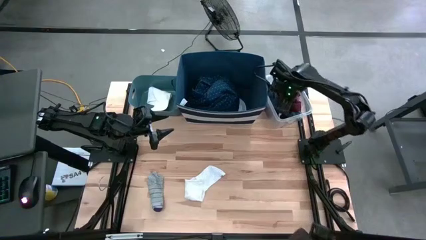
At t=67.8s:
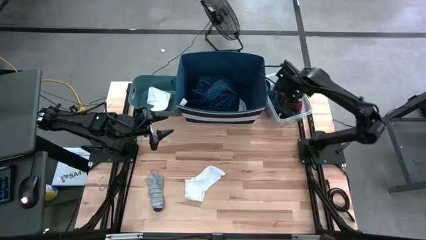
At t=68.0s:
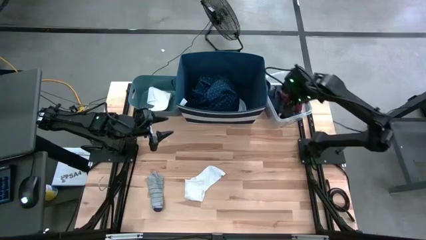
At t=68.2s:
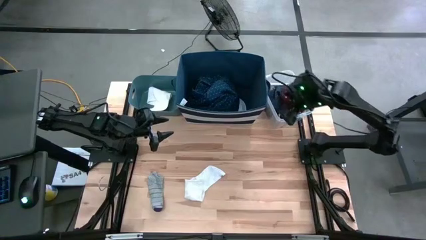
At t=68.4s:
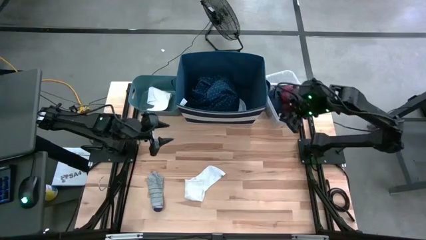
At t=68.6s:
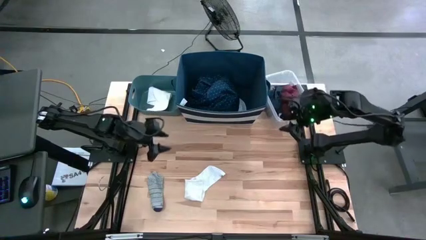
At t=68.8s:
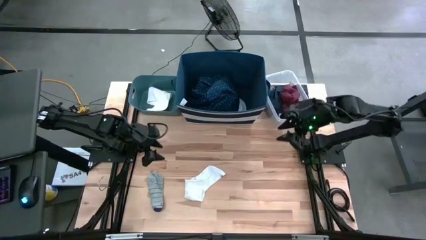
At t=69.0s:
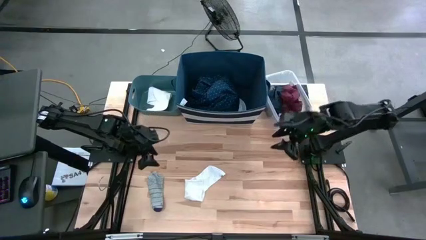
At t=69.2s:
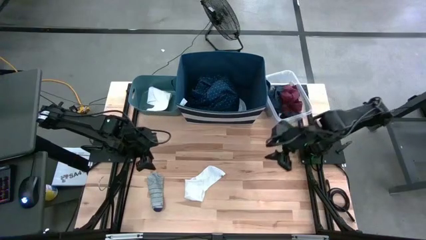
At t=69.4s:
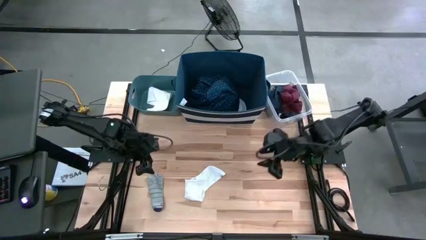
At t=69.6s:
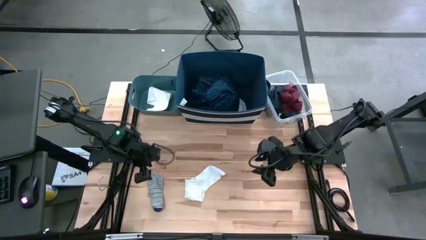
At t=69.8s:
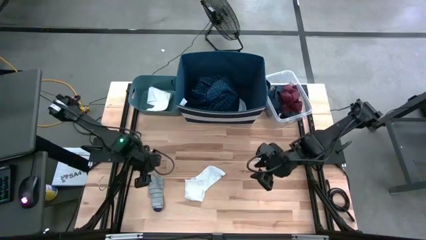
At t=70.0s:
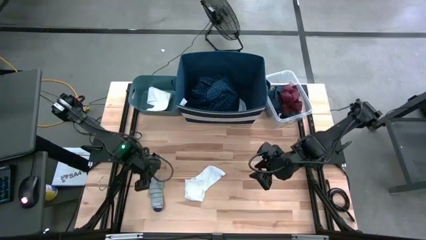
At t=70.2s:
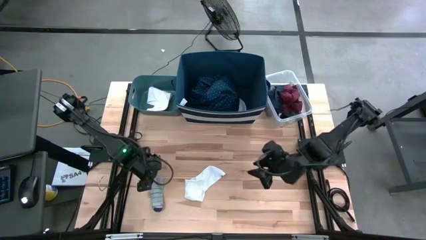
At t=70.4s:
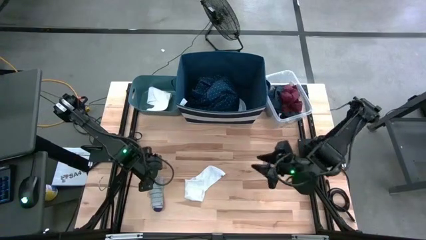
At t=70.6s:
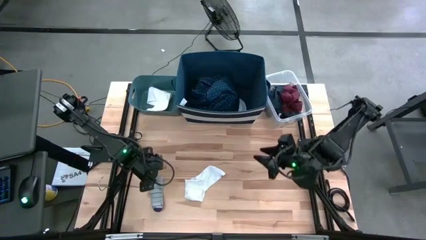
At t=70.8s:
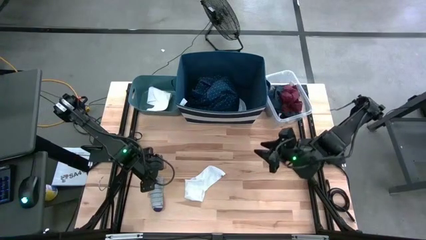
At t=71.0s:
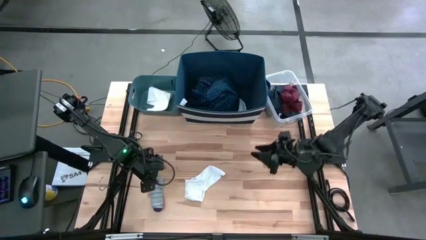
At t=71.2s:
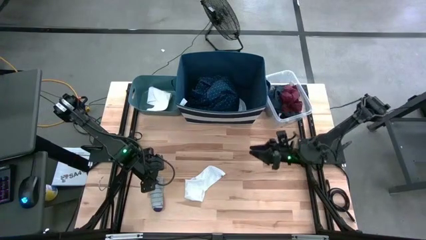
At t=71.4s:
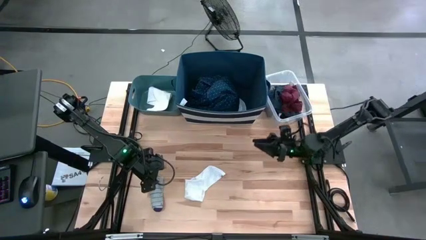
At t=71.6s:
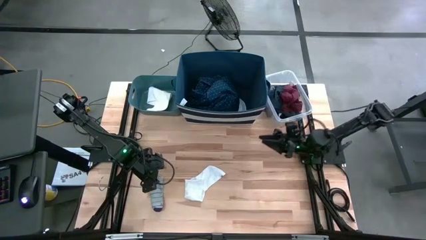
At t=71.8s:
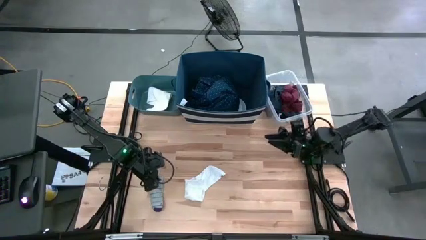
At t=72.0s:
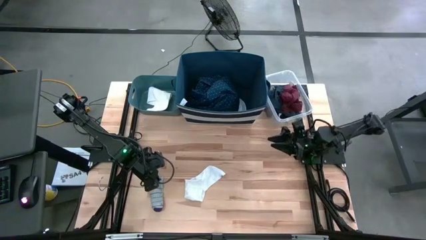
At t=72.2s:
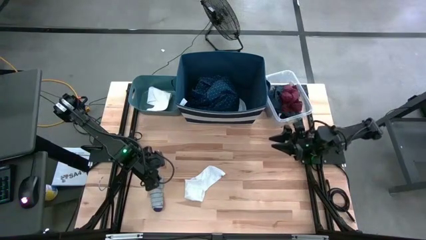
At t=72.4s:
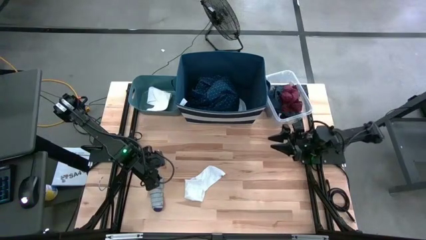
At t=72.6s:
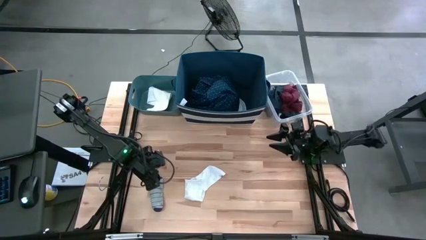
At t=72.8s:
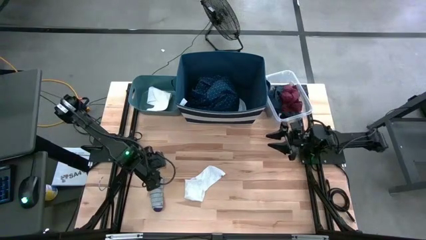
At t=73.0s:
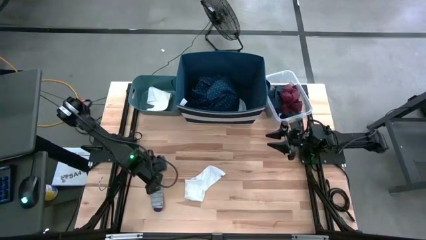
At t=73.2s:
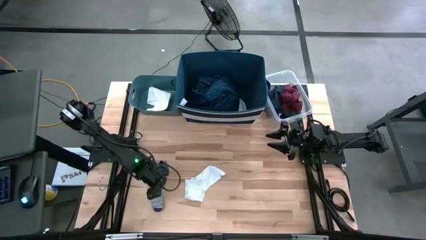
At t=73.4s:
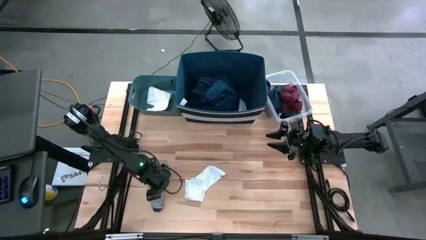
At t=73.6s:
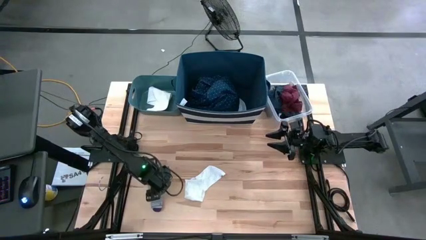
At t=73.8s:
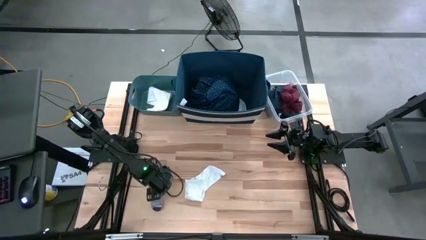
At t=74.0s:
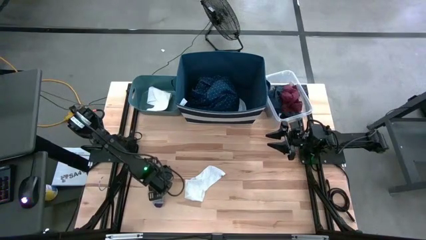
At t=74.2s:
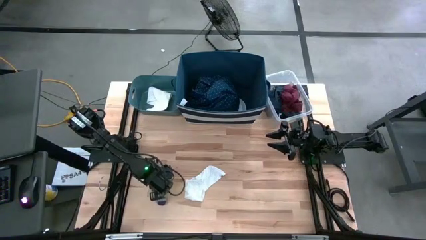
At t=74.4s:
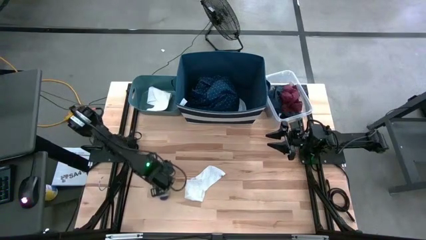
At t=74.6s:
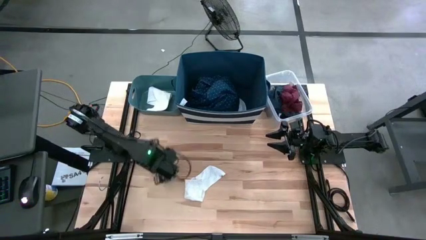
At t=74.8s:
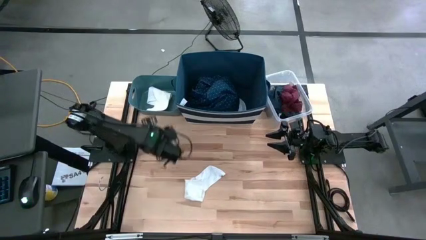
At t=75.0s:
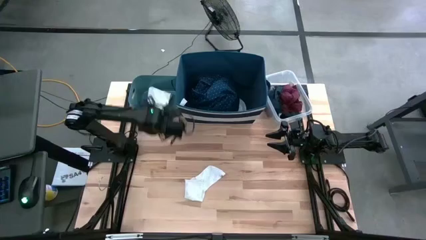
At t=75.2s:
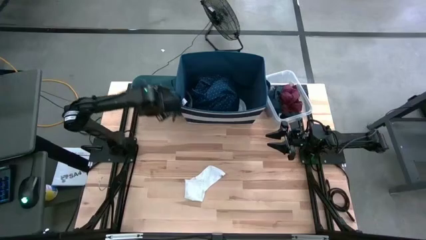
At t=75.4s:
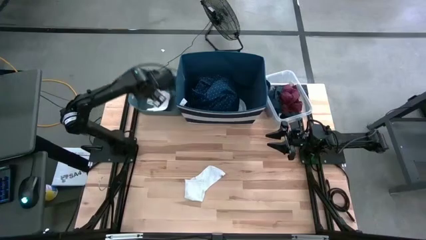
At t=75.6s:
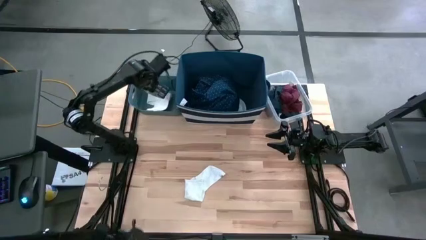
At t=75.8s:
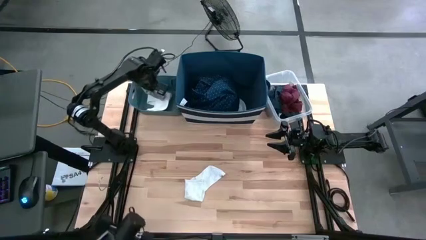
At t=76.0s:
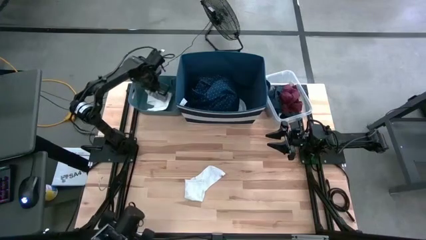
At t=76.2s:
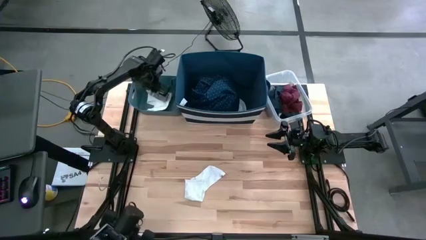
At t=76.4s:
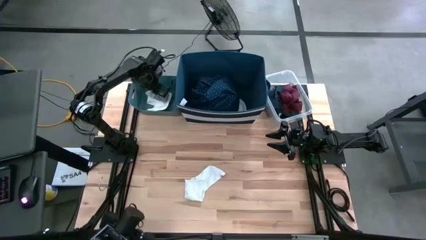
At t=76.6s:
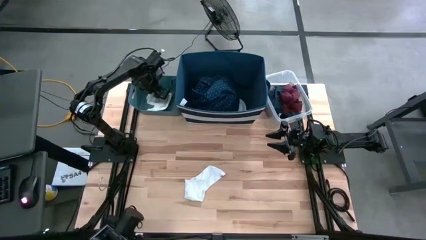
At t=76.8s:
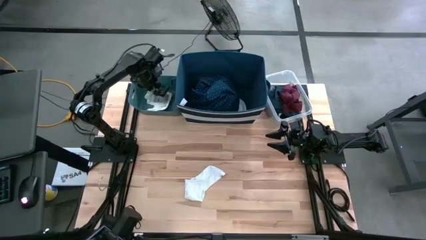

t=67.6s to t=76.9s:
Task: Pick & Place Cloths
Put the gray sock into the green bin

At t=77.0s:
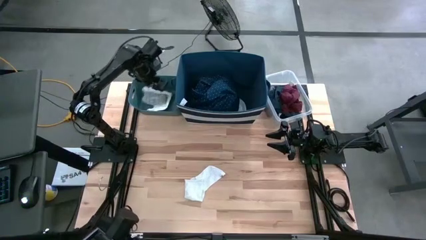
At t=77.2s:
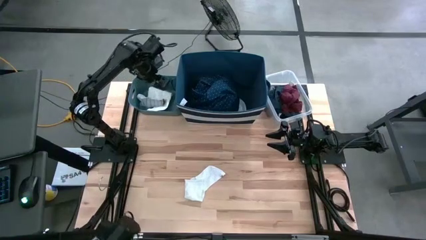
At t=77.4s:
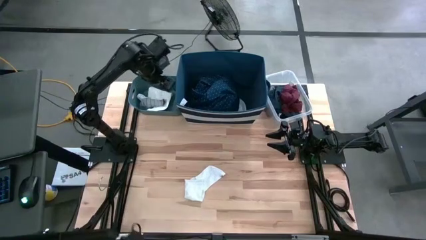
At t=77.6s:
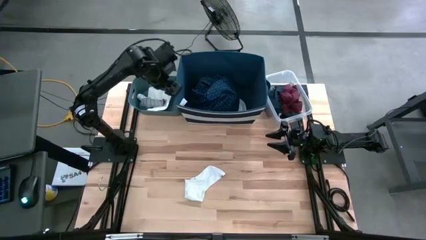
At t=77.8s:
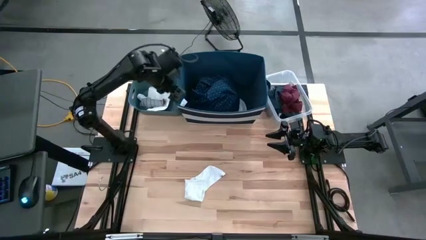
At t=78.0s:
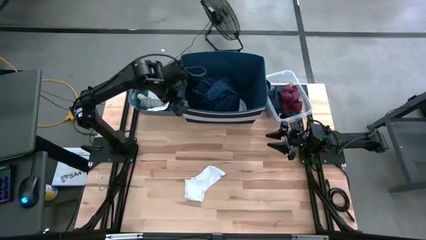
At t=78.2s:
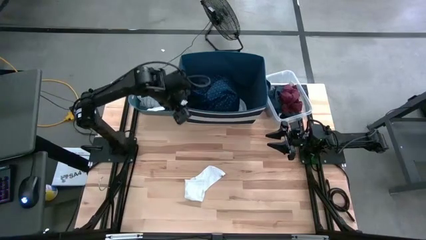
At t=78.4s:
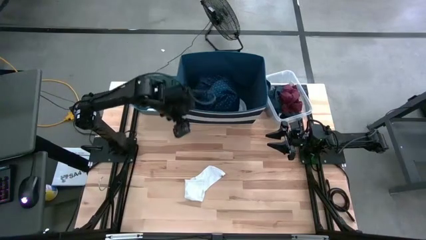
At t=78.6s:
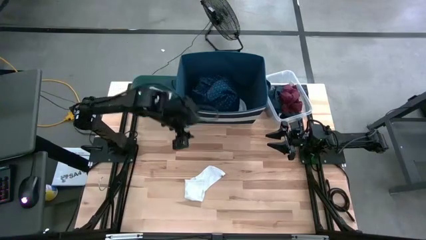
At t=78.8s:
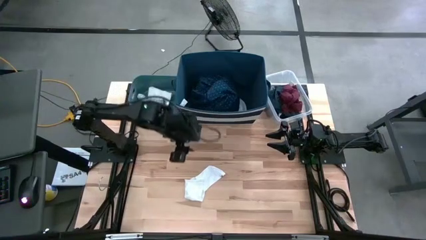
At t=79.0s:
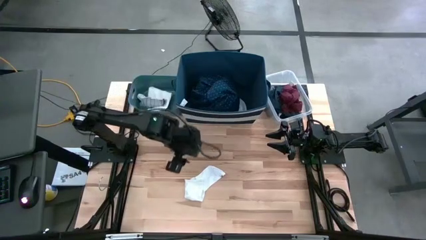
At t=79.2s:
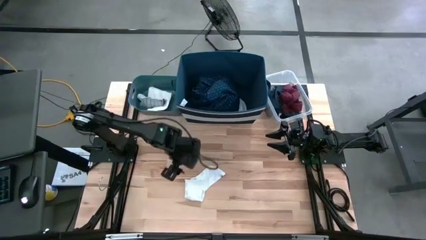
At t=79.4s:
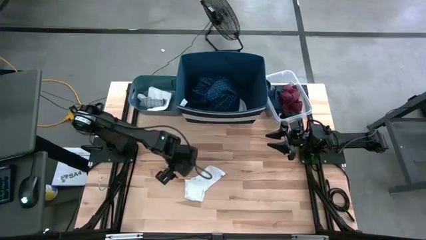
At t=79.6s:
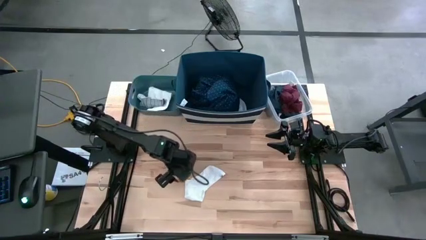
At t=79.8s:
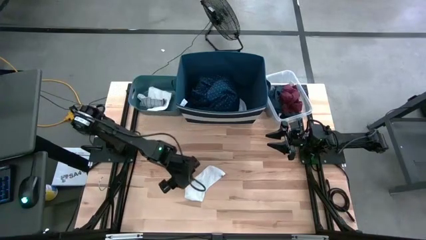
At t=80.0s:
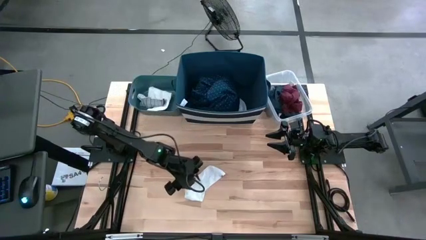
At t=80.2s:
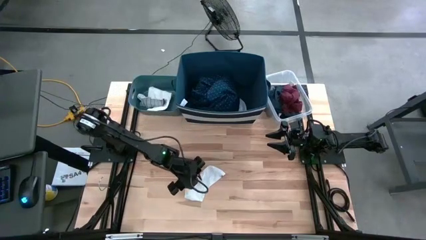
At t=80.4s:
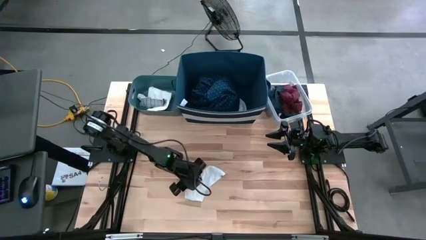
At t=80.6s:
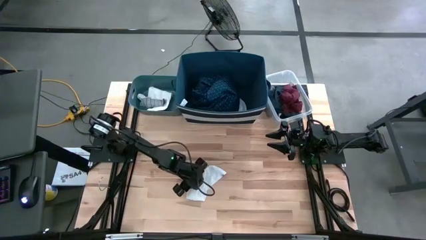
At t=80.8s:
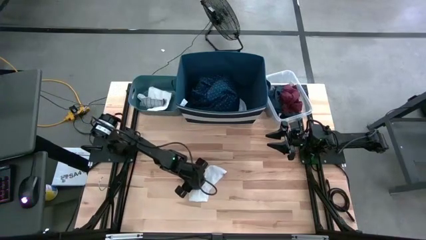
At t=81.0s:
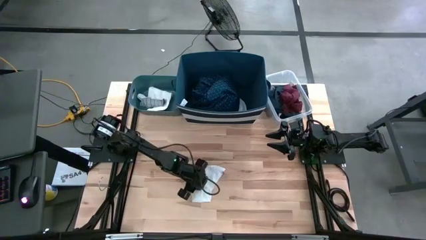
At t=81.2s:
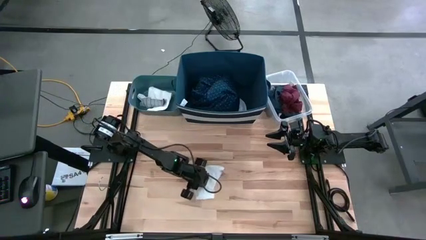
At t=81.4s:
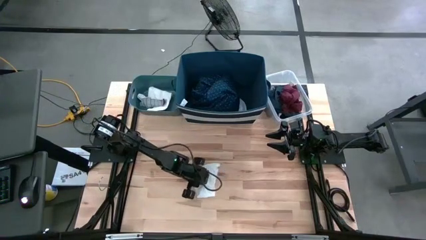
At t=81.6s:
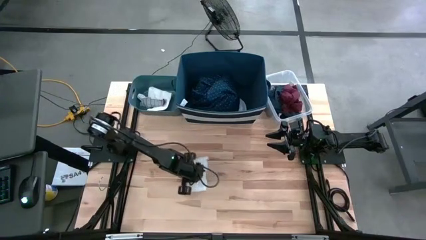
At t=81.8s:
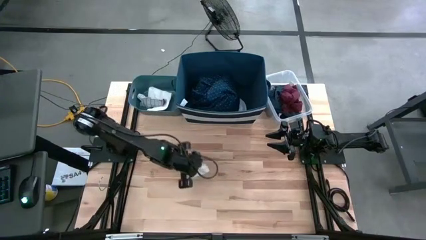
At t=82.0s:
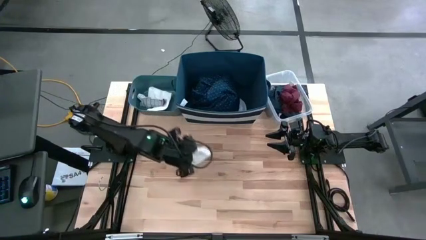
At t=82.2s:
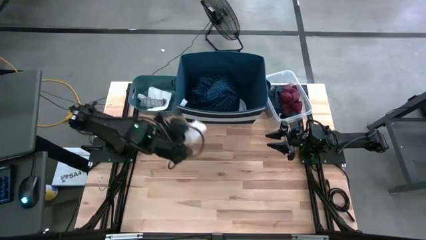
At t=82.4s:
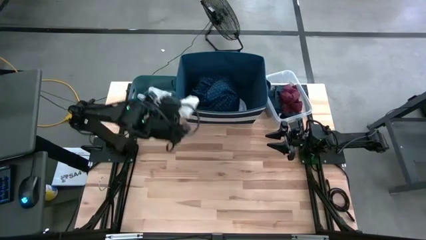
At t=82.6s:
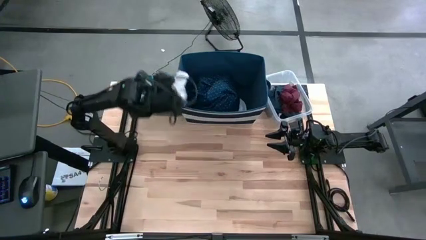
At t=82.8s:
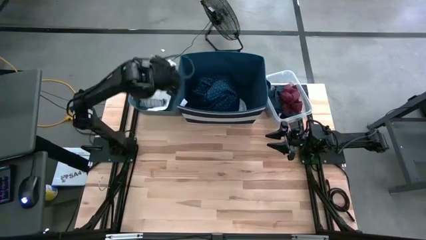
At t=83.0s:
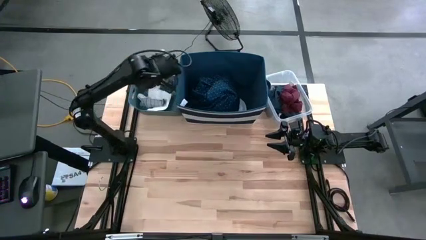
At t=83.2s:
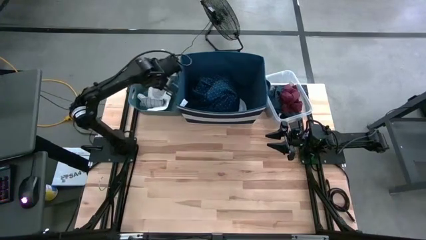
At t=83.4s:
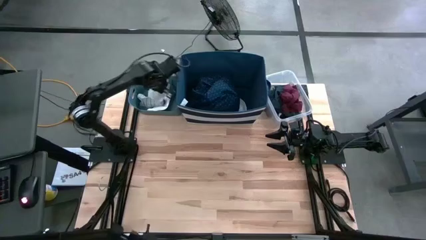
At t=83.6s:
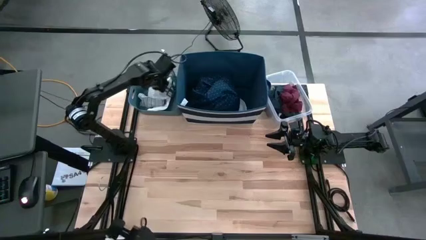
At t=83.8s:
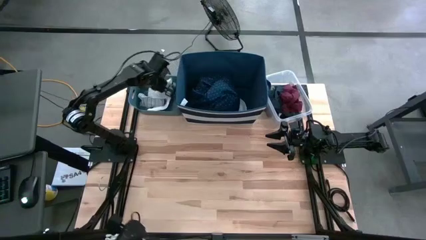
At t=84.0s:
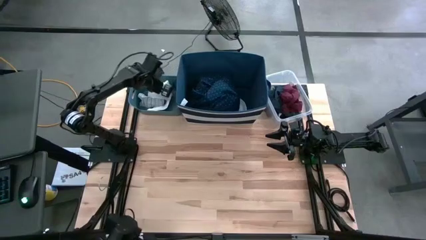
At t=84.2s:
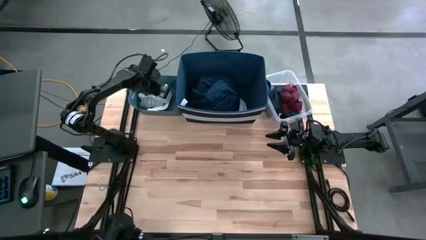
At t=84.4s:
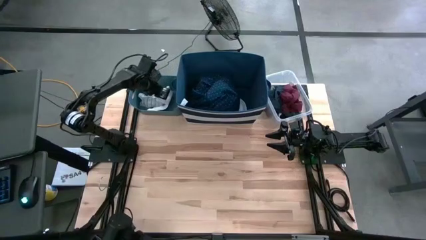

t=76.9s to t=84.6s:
Put the white sock into the green bin
